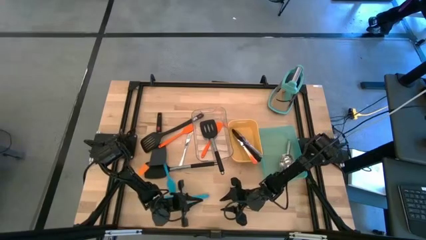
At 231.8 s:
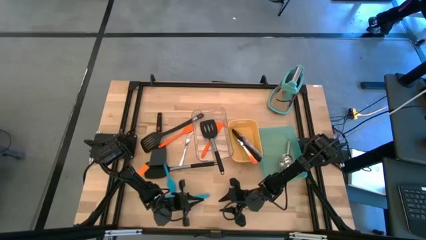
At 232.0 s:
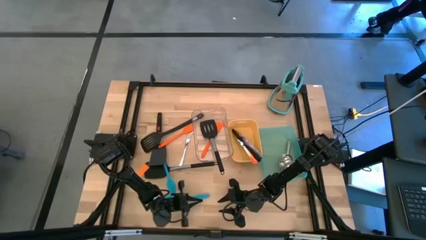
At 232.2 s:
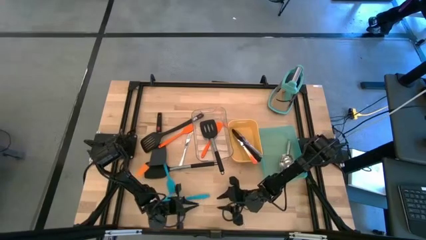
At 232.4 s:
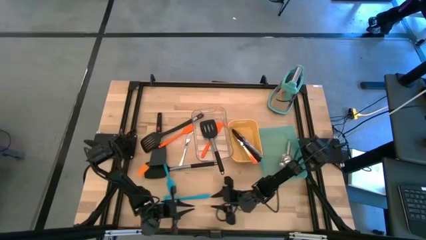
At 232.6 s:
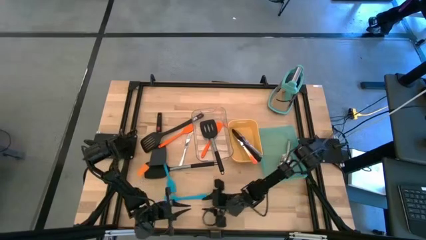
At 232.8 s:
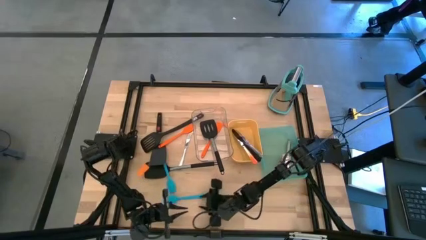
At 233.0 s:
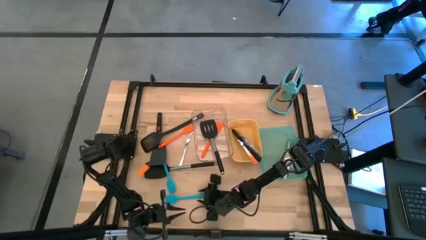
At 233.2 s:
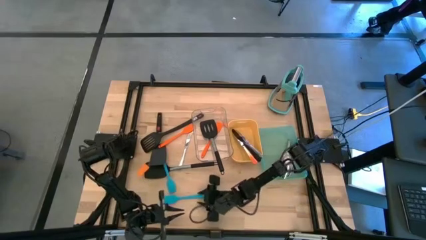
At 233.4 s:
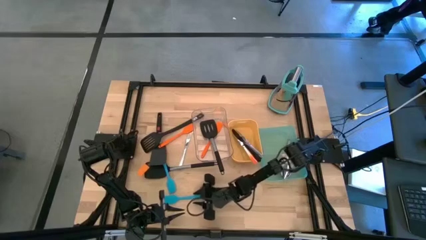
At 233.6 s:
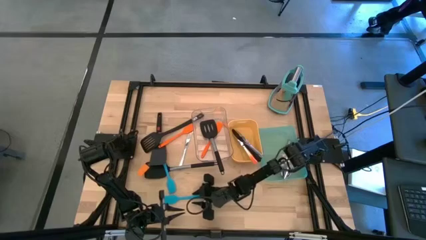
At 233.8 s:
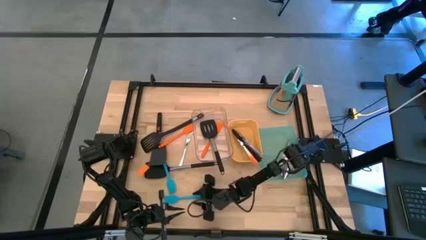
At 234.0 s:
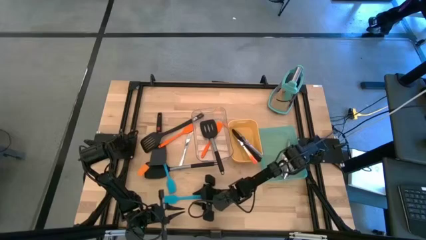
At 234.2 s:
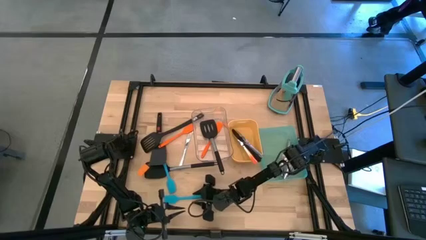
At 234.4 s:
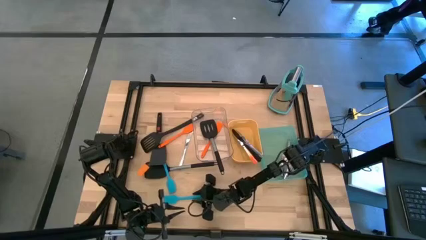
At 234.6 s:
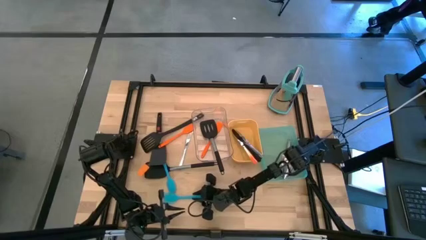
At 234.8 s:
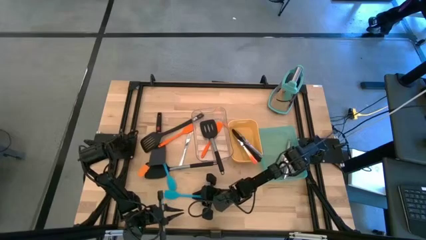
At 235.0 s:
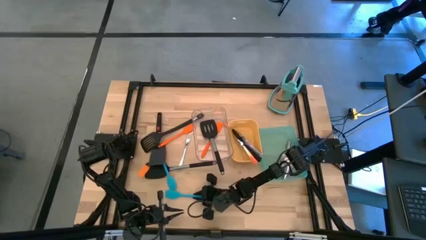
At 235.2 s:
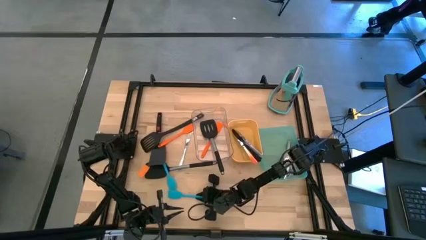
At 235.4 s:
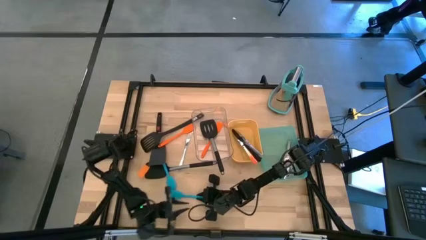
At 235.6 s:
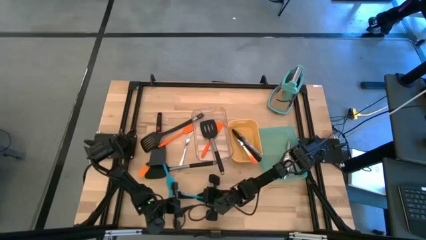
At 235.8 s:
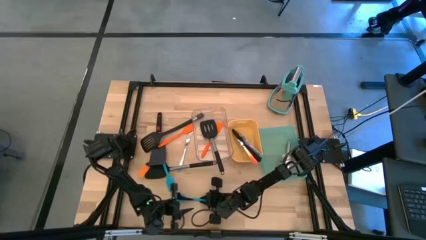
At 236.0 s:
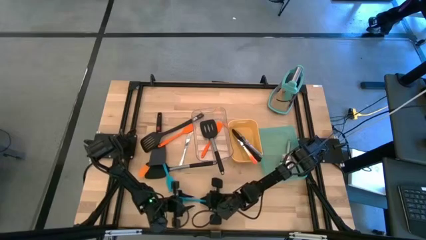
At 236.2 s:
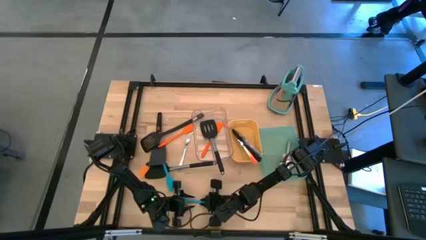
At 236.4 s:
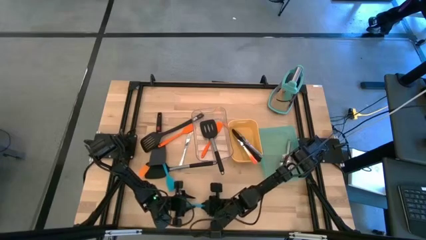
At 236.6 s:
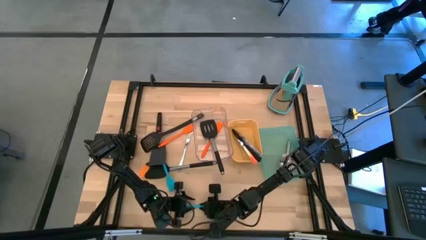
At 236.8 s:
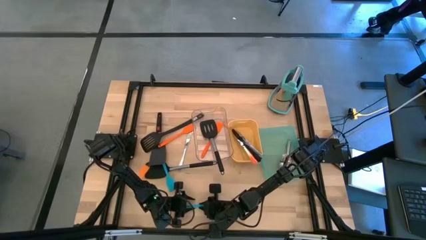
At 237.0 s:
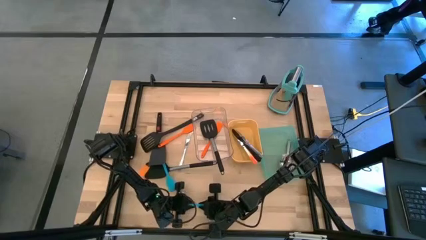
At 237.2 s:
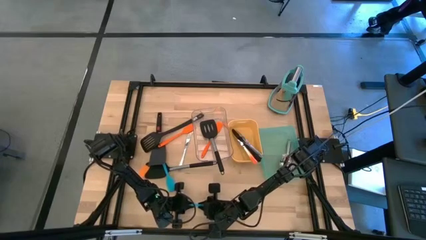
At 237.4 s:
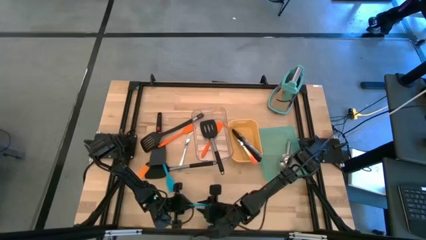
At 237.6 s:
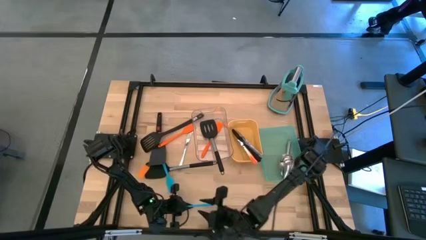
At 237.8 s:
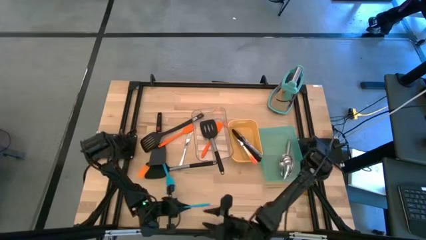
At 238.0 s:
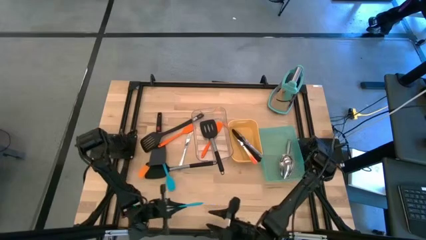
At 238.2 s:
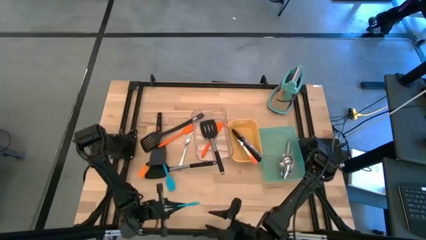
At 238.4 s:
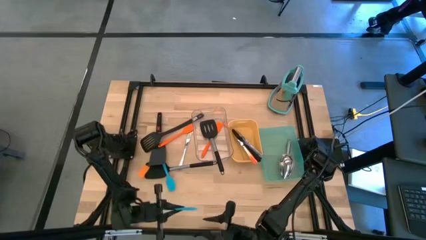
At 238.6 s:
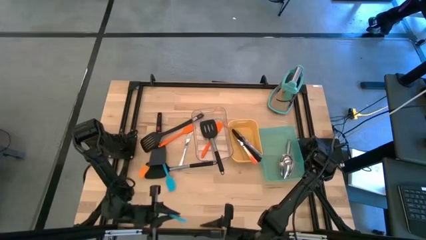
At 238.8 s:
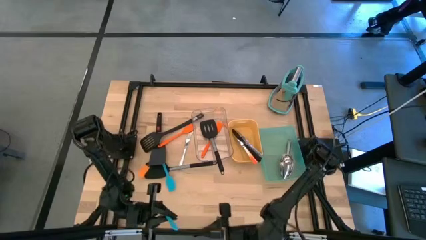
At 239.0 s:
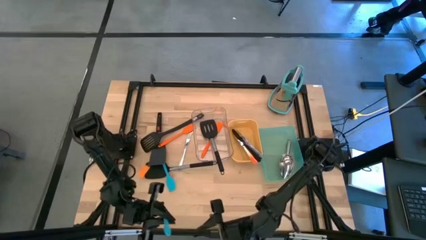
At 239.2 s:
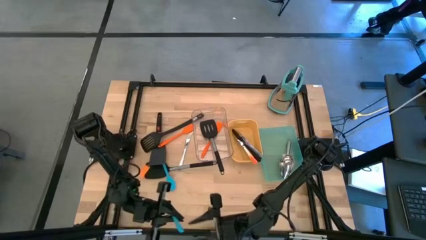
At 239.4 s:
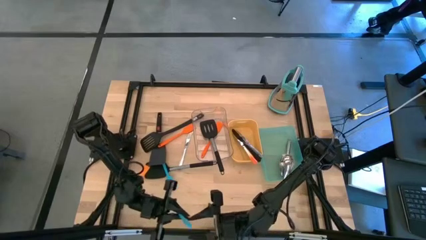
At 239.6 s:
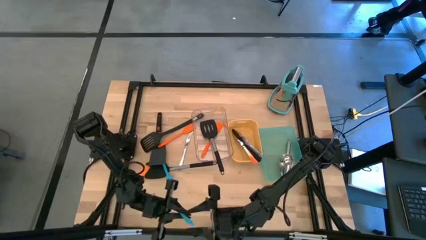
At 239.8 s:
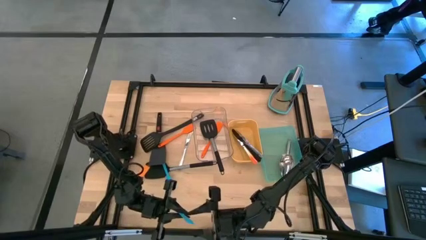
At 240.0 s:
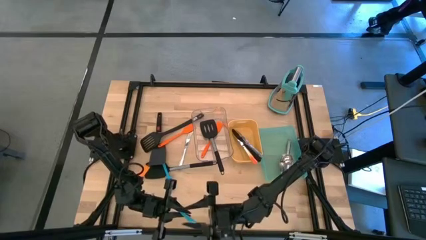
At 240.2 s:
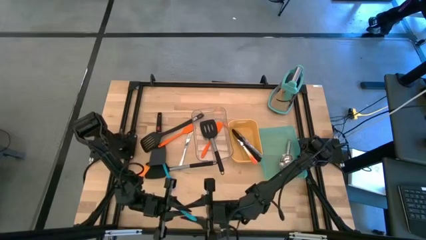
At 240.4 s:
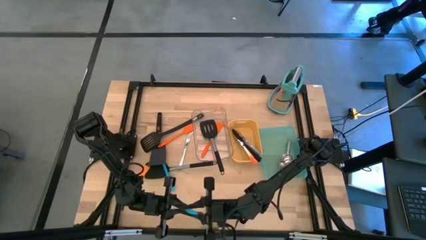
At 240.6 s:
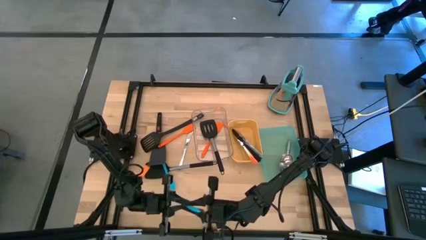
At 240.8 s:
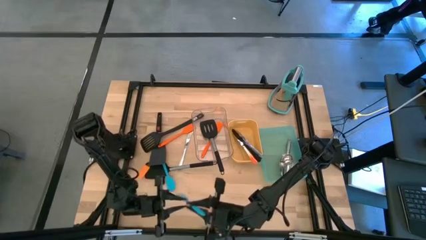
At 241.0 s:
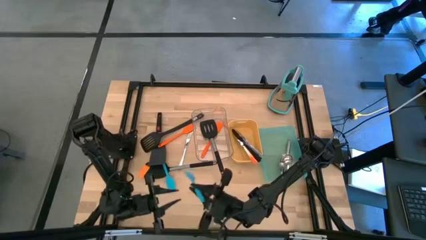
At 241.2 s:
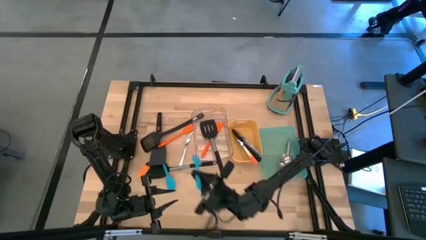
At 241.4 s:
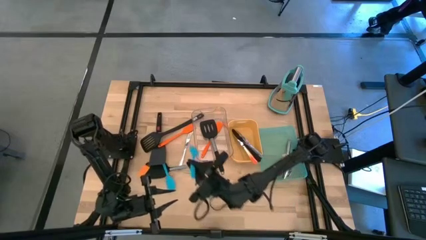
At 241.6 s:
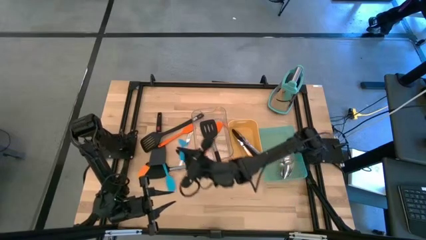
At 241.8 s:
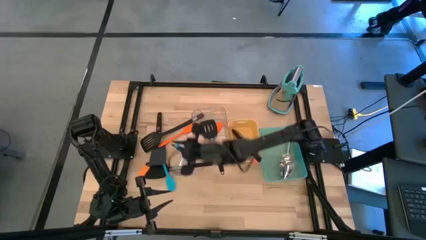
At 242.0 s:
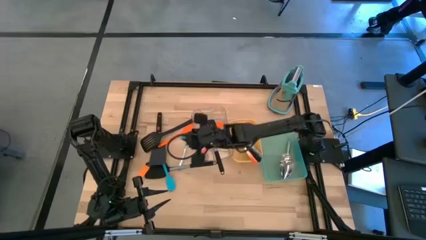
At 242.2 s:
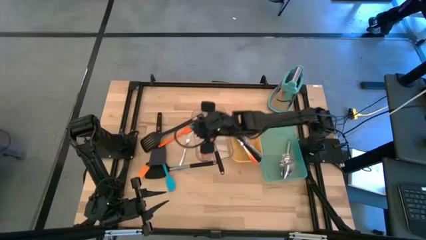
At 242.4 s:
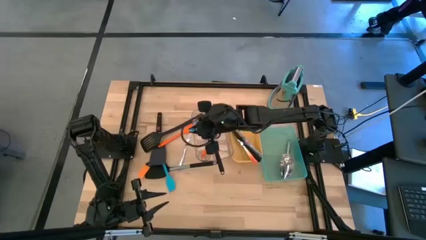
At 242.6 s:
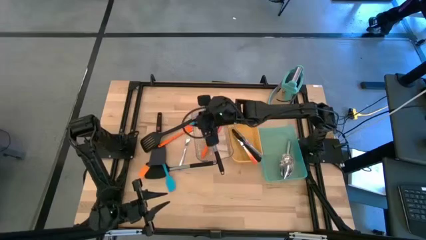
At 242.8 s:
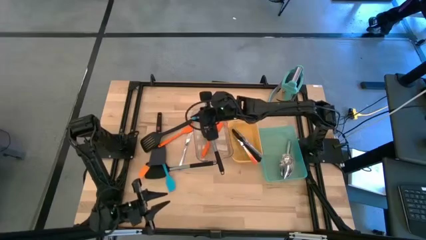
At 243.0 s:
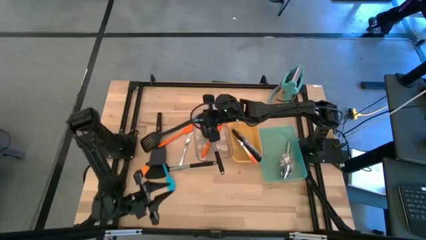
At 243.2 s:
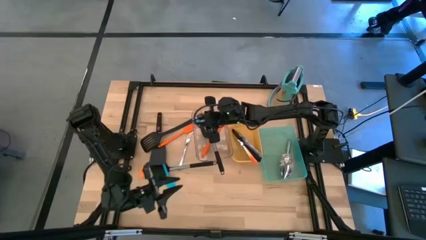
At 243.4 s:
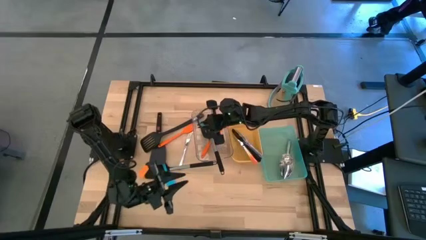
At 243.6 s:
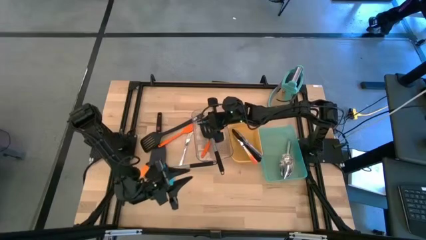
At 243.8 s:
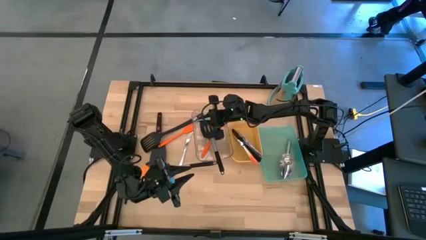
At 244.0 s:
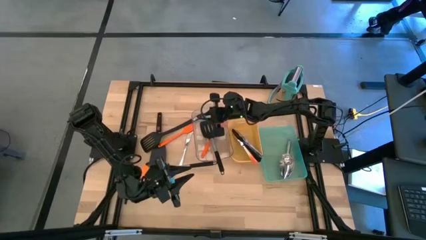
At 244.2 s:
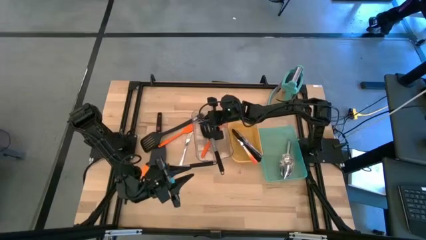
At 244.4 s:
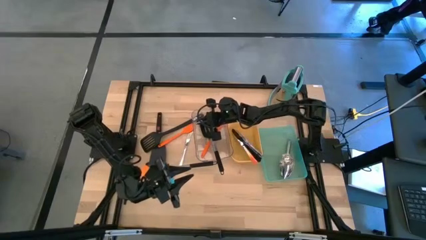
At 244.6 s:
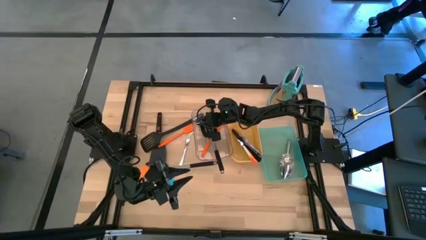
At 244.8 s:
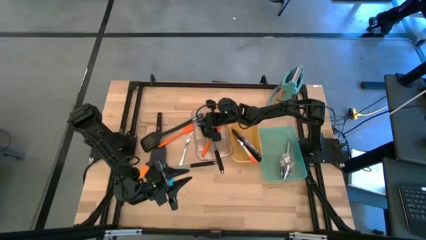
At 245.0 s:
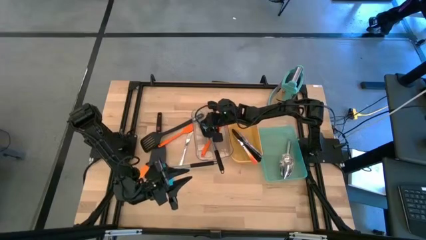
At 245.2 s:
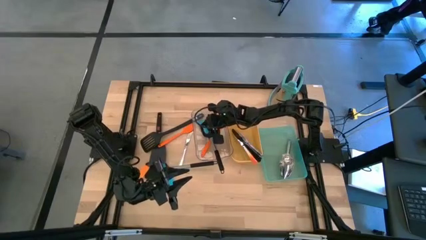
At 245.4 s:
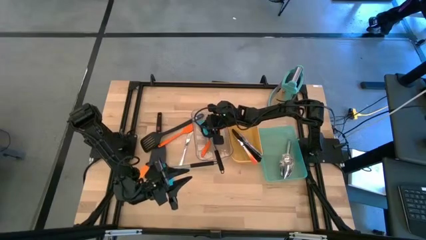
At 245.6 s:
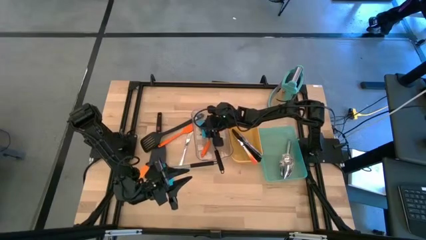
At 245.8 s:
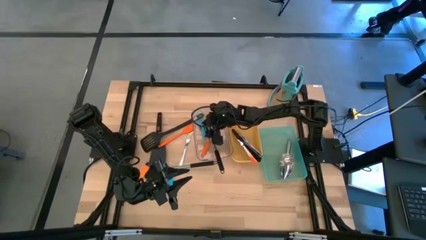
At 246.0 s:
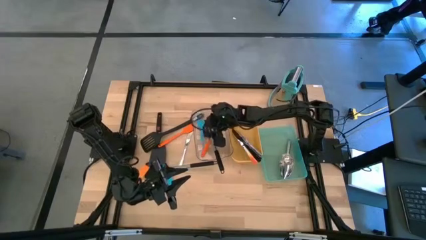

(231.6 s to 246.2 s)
Task: Pick & Place Kitchen Items
Put the blue spatula into the transparent bin
